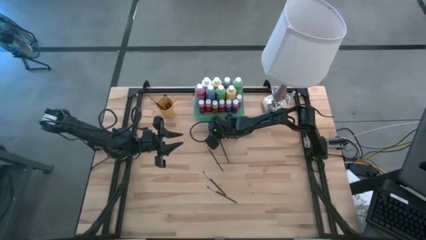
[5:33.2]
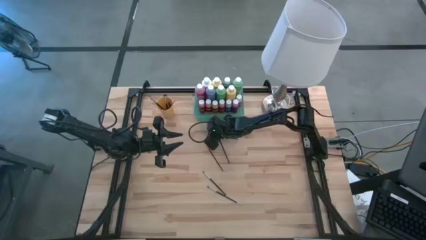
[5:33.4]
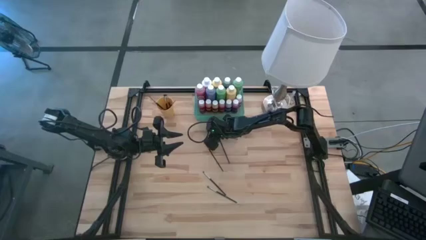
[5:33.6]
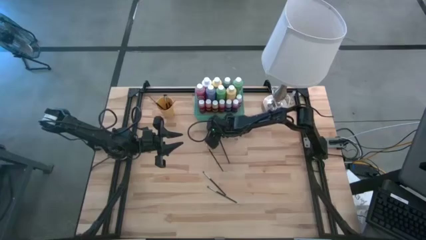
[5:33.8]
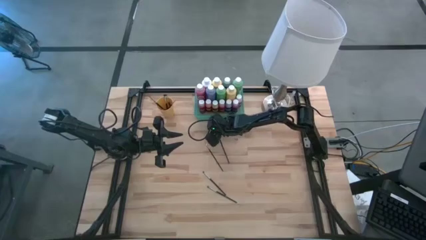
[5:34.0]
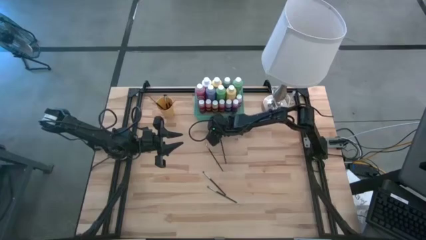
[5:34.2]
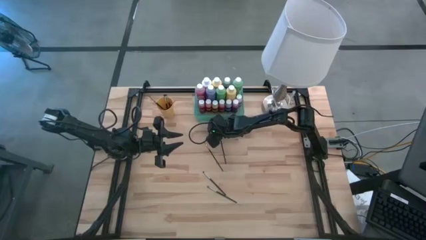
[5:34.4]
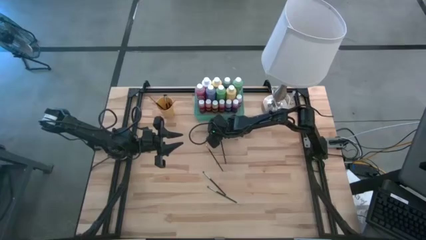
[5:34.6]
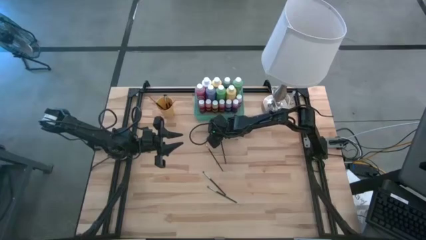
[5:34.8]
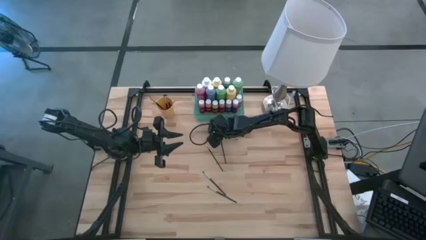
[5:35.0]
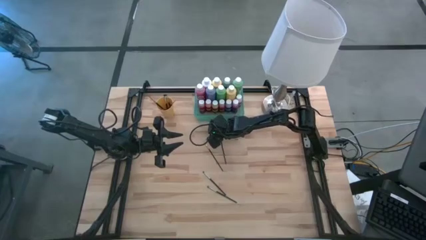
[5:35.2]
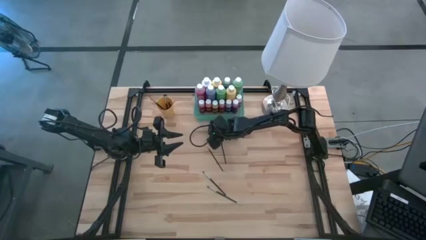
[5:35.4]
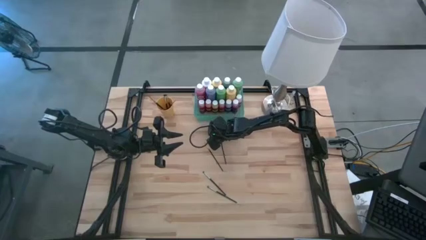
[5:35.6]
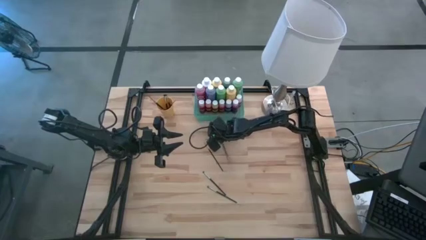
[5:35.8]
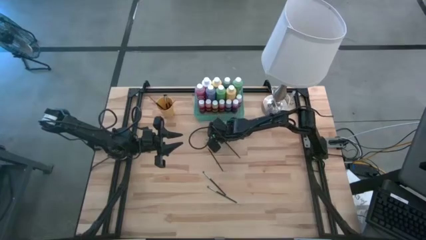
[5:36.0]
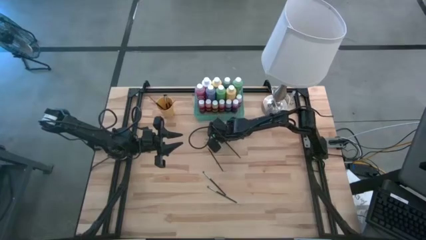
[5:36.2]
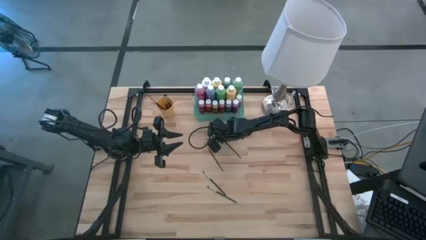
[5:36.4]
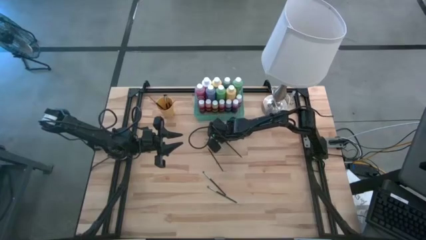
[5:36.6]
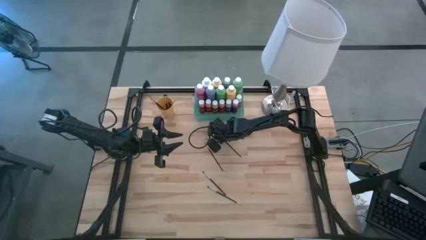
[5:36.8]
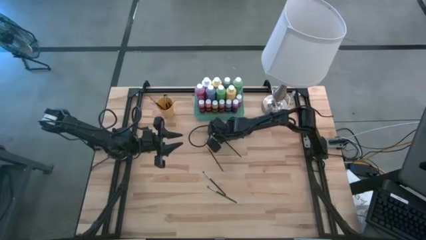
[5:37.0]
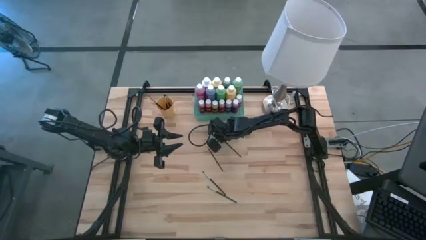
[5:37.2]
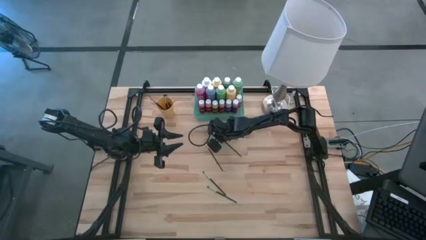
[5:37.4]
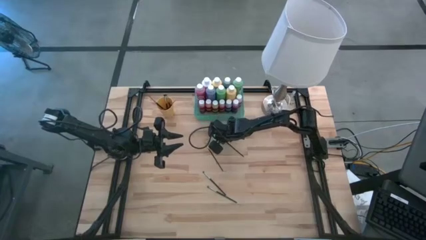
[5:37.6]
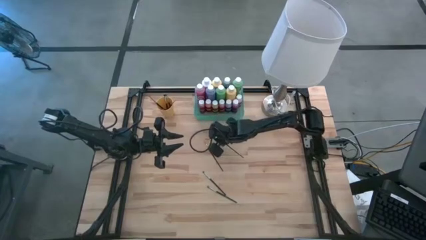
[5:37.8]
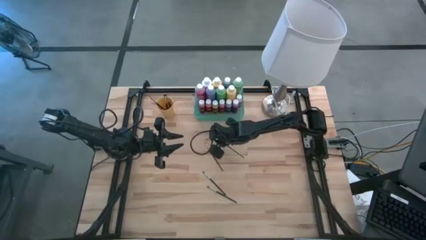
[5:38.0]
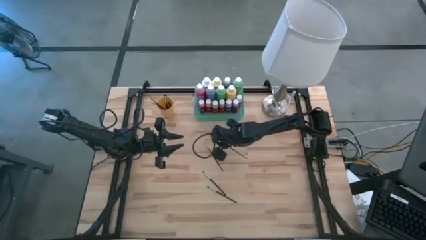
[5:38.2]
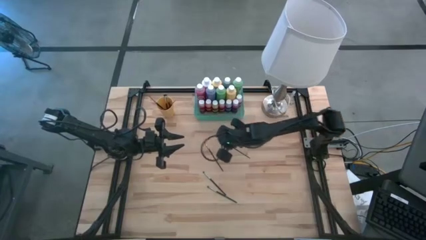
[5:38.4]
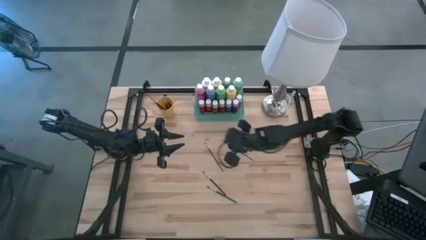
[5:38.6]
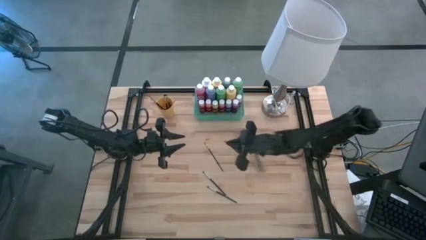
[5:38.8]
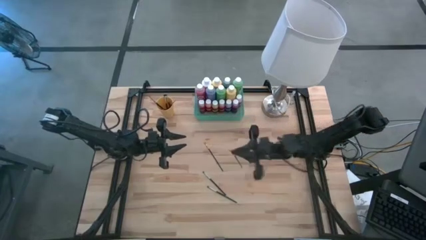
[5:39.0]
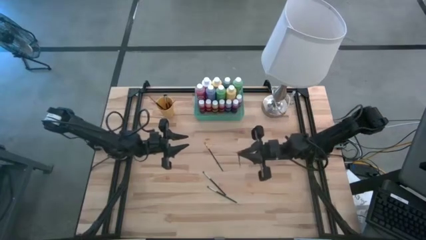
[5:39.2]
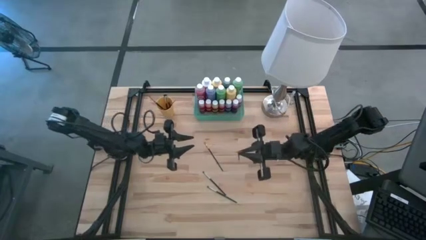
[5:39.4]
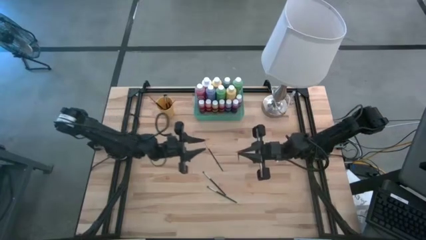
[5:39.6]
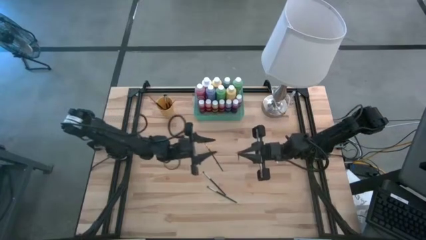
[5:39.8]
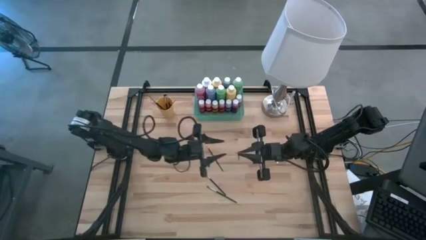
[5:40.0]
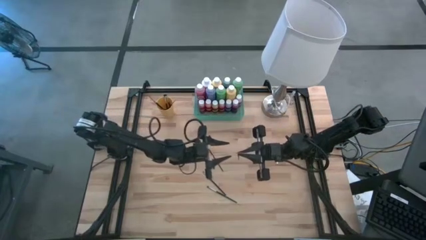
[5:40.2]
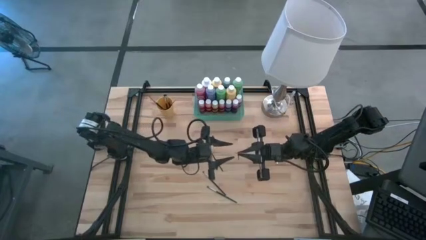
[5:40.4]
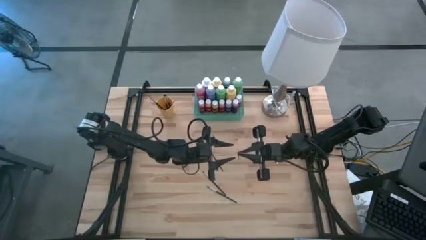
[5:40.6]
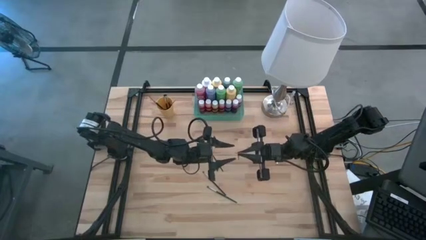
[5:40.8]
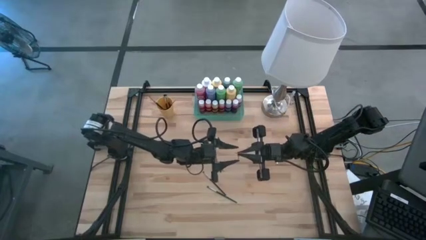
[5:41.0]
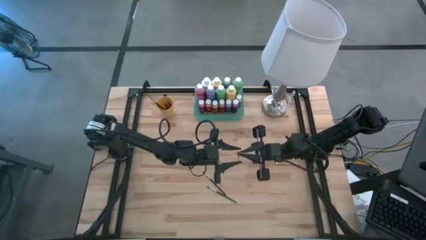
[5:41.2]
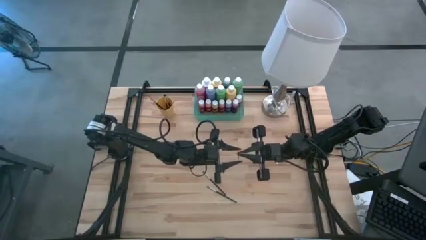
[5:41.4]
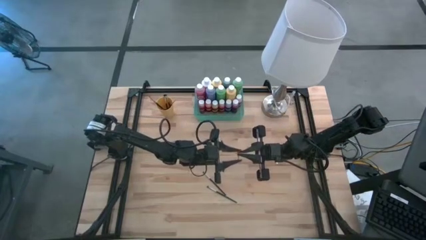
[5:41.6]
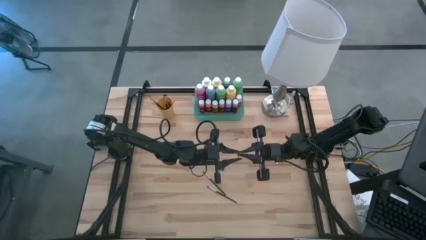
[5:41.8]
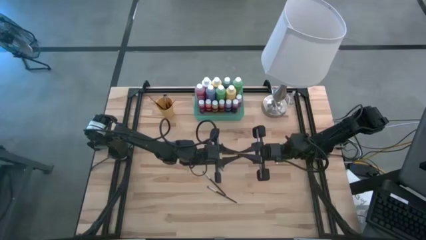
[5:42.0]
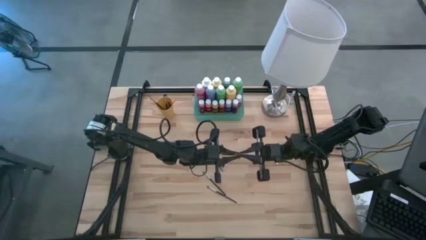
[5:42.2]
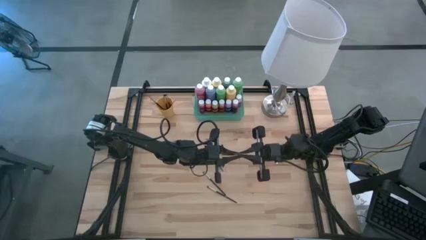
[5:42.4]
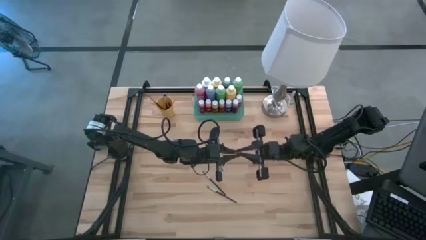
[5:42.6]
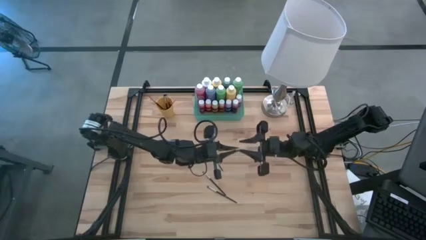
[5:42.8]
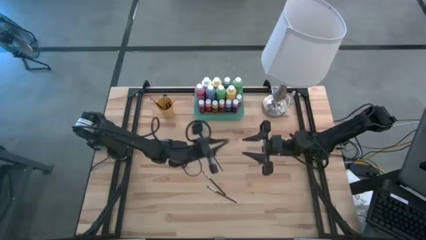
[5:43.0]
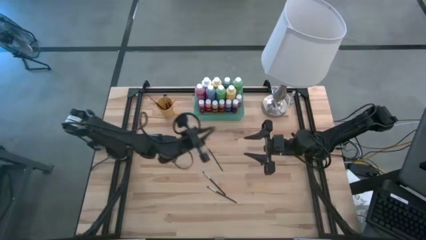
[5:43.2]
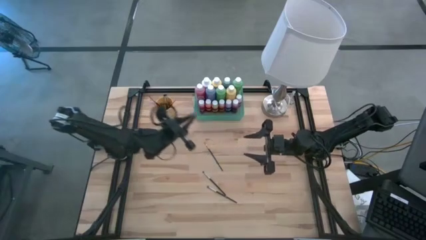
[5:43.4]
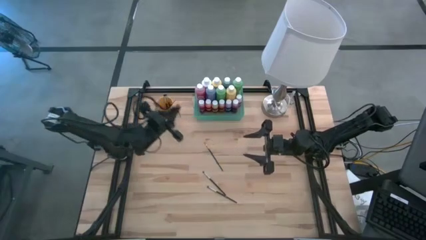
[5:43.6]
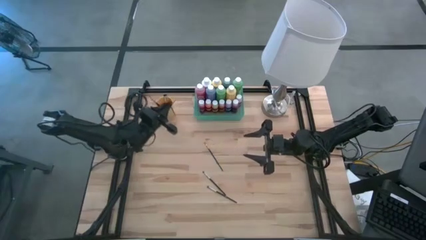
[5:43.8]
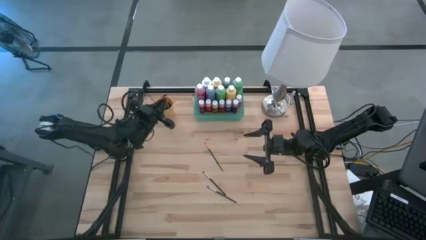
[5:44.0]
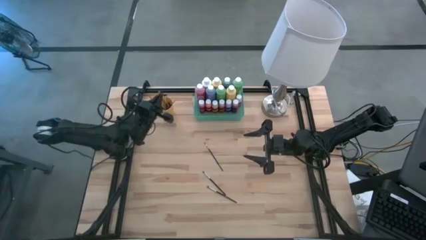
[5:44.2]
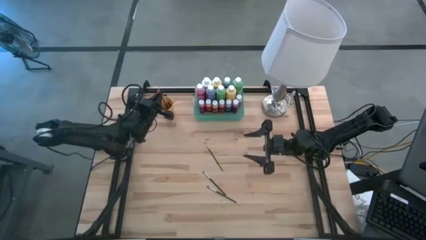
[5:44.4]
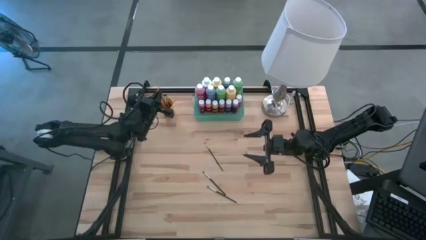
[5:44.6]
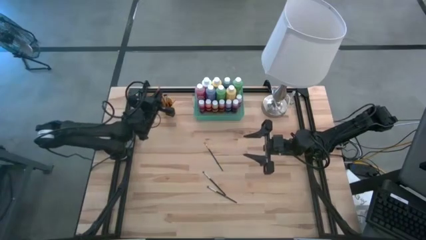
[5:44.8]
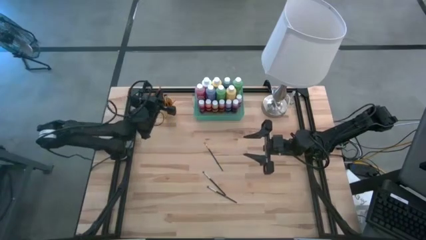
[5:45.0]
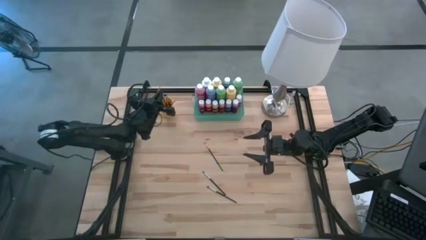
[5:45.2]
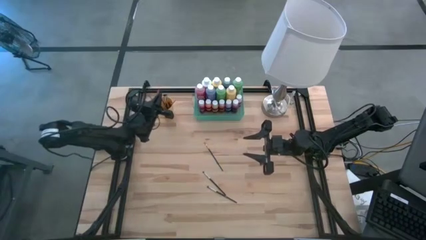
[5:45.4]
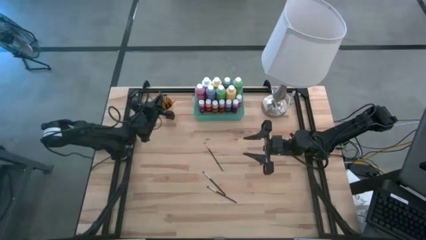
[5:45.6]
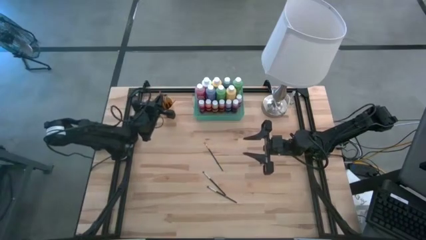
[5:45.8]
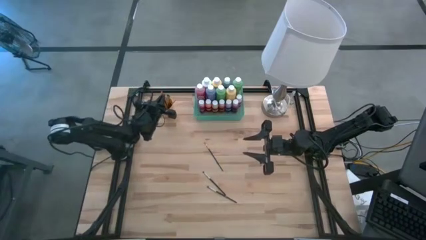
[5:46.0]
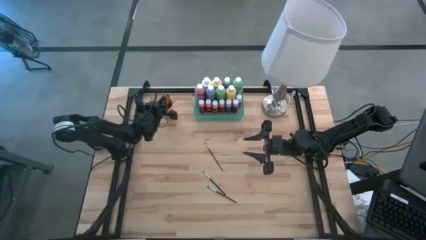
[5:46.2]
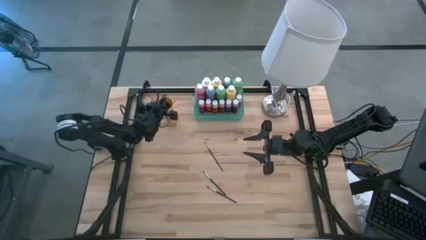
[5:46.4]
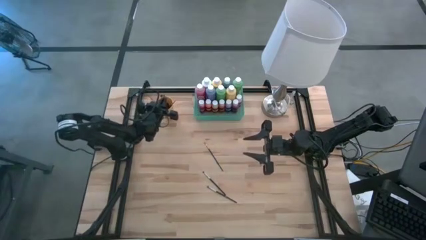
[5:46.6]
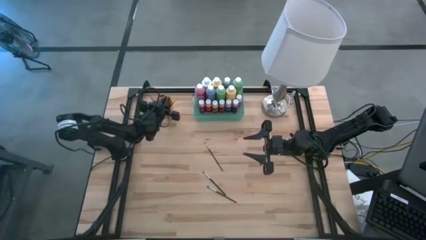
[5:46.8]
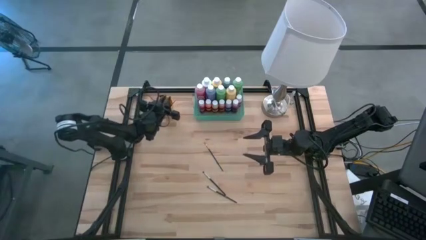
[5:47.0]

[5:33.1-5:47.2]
Task: Pick & Place Paint Supplies
Put the gold paintbrush into the orange cup

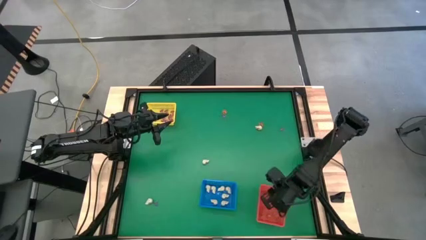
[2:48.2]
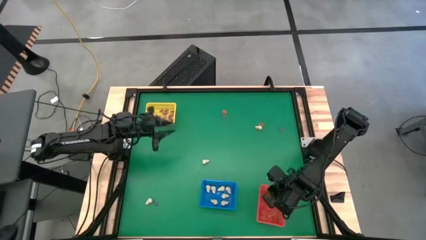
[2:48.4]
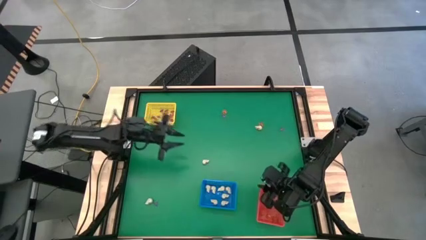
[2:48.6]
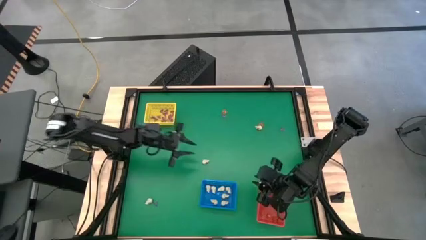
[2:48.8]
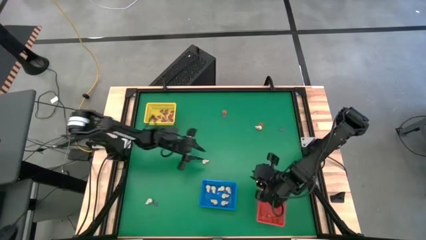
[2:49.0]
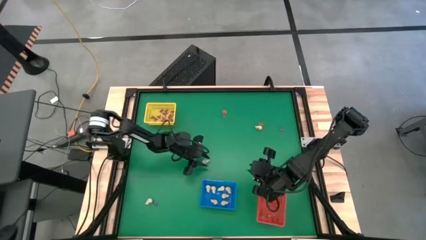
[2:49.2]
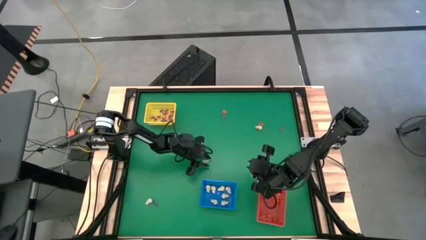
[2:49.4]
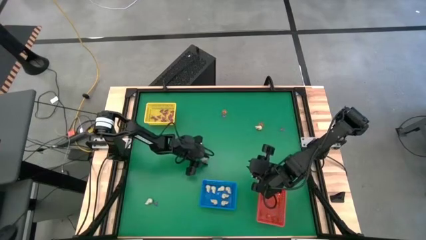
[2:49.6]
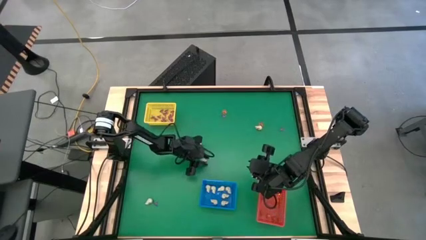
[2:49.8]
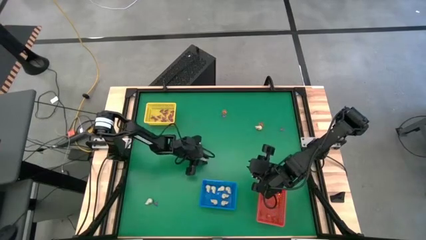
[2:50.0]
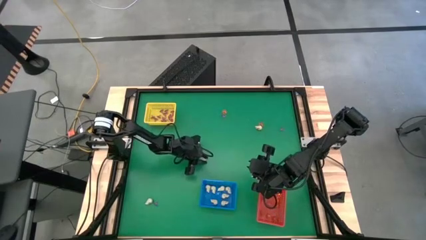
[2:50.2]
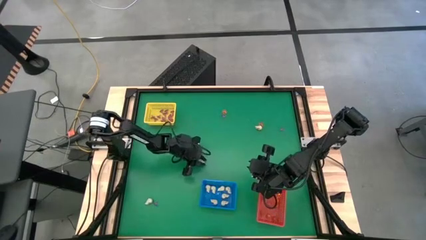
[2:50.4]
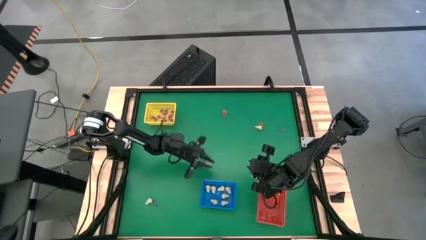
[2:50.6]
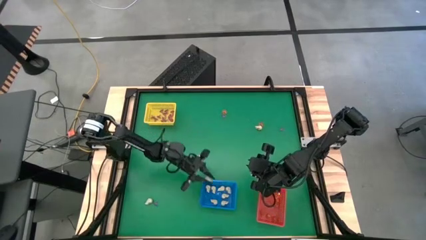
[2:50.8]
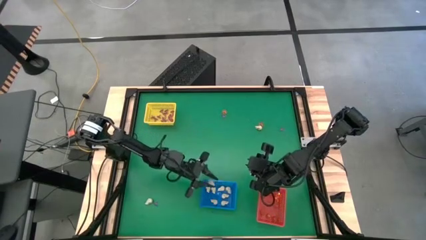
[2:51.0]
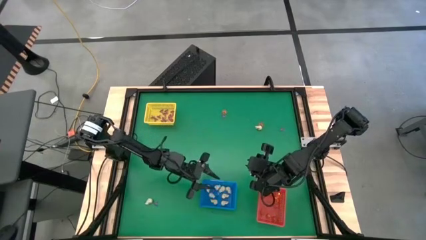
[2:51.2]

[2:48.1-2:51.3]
Task: Sort Halloween decoration
Put the white skull toy into the blue basket
